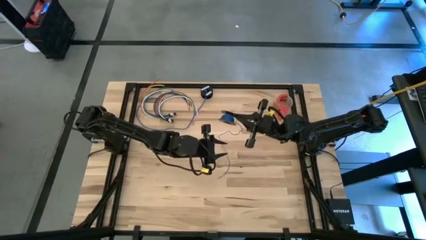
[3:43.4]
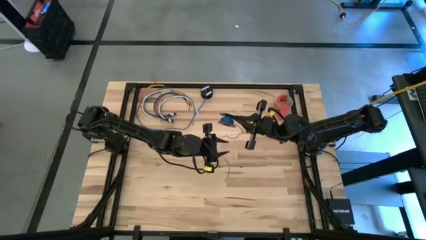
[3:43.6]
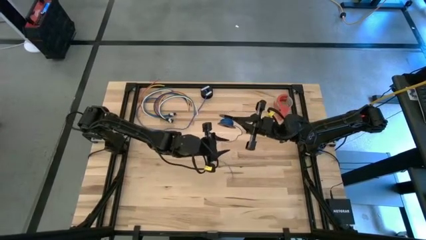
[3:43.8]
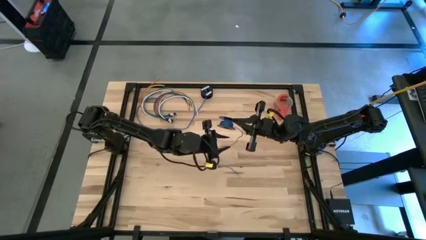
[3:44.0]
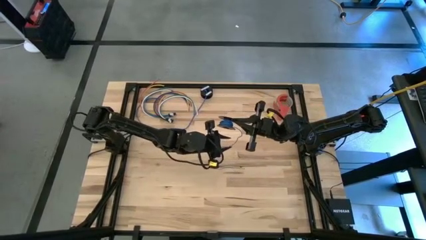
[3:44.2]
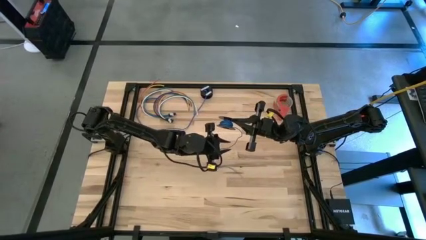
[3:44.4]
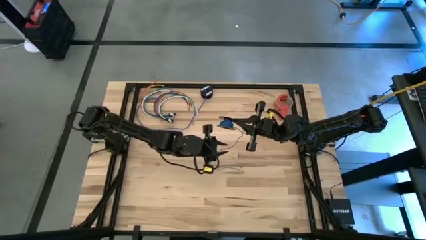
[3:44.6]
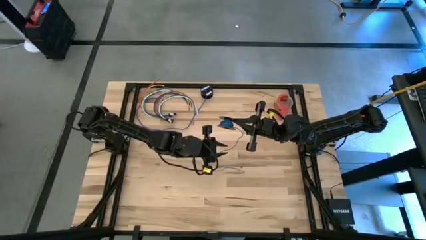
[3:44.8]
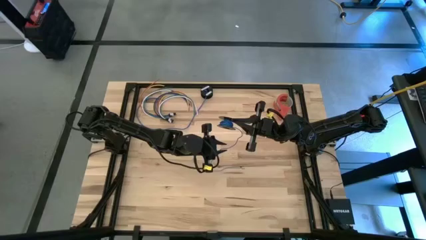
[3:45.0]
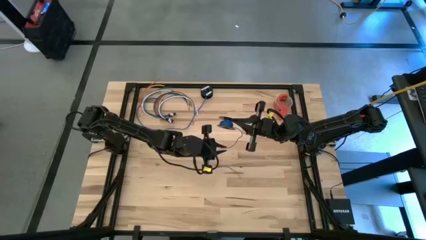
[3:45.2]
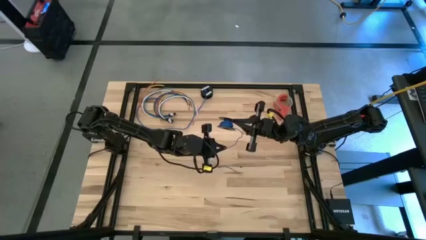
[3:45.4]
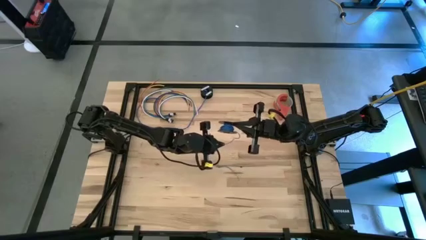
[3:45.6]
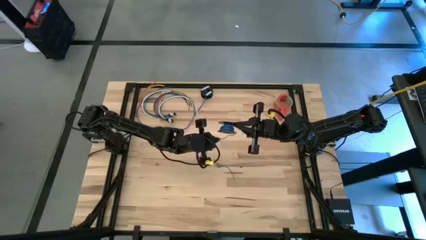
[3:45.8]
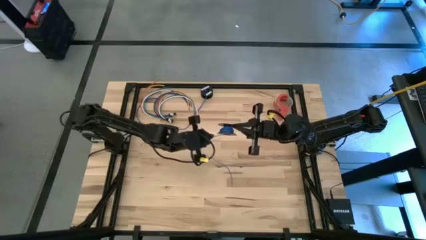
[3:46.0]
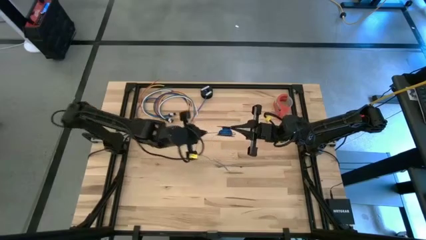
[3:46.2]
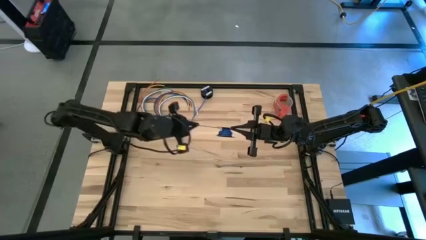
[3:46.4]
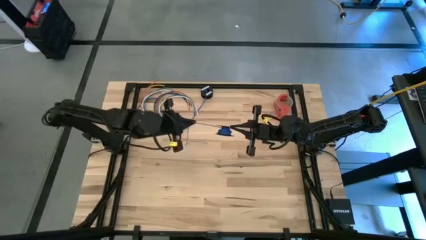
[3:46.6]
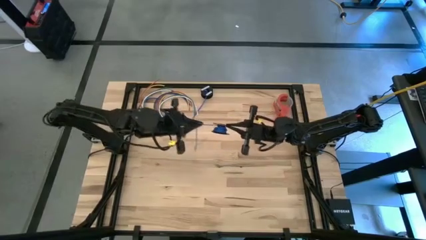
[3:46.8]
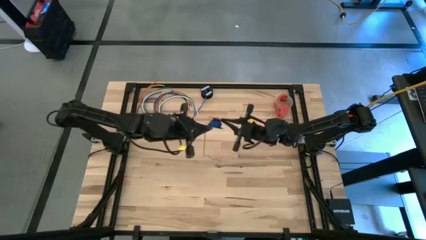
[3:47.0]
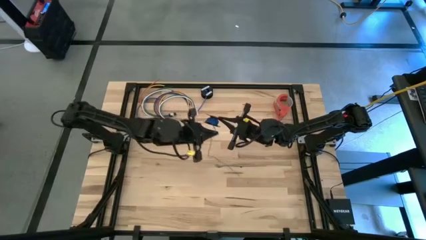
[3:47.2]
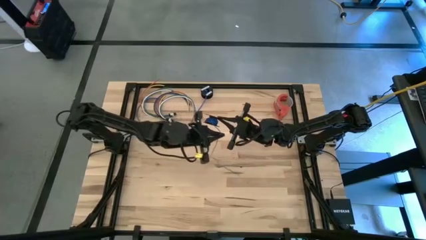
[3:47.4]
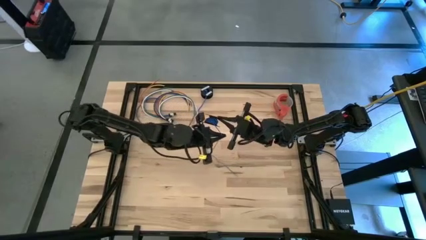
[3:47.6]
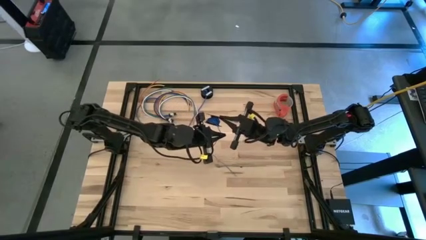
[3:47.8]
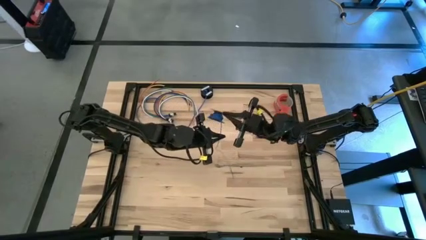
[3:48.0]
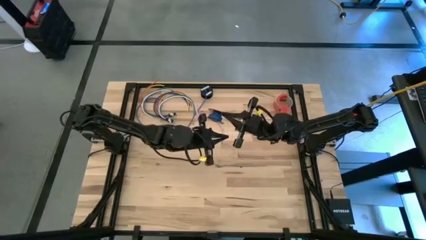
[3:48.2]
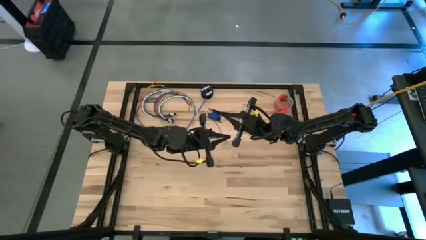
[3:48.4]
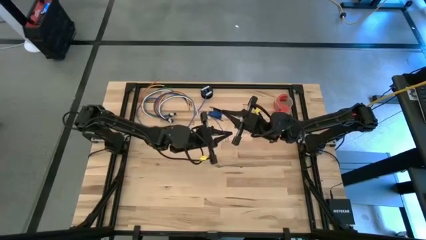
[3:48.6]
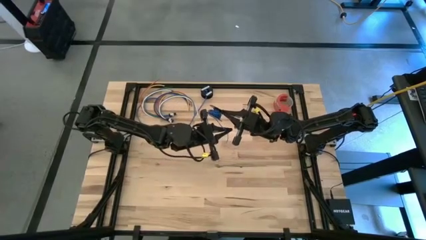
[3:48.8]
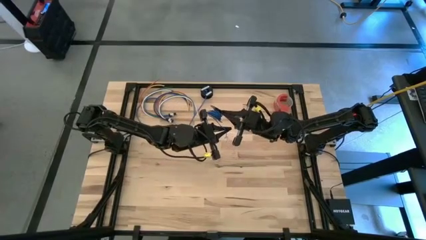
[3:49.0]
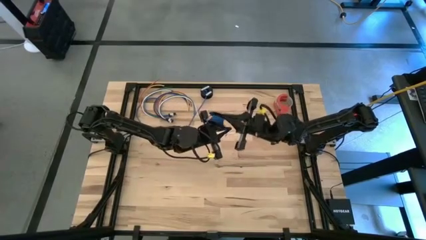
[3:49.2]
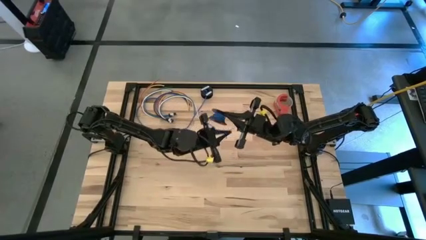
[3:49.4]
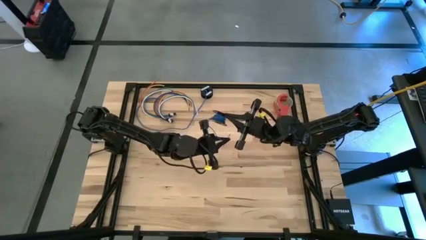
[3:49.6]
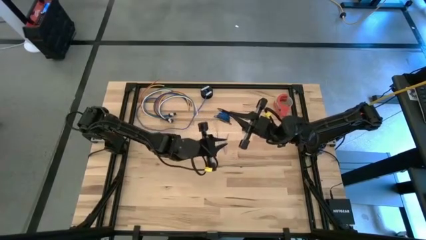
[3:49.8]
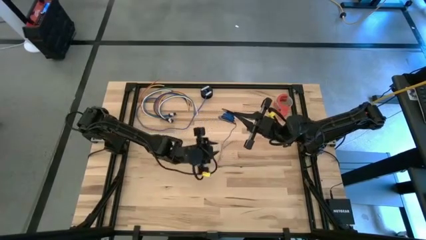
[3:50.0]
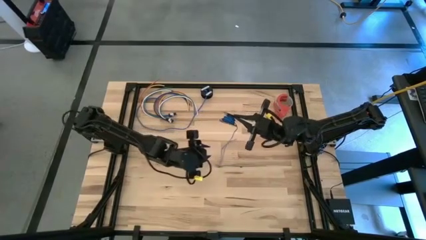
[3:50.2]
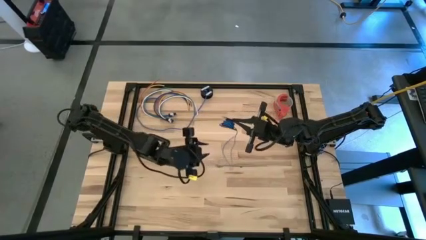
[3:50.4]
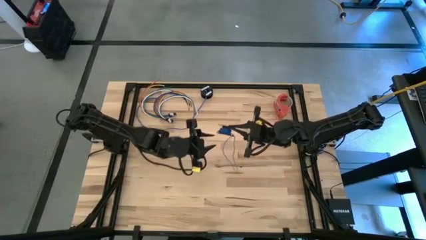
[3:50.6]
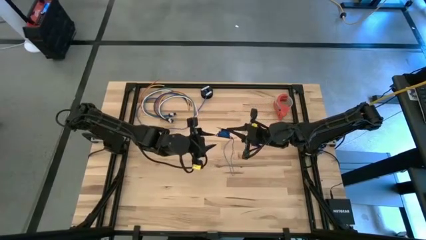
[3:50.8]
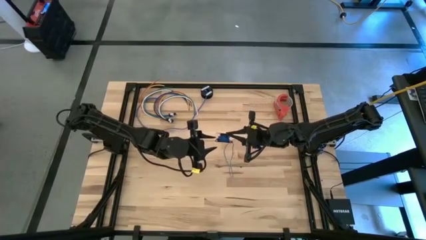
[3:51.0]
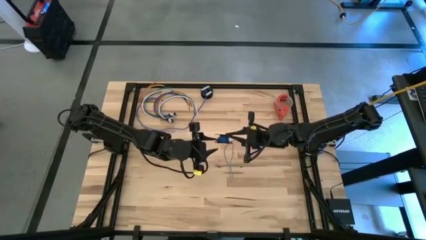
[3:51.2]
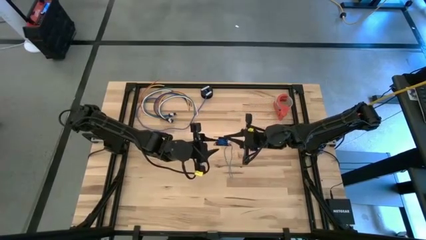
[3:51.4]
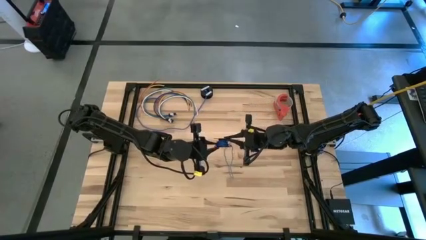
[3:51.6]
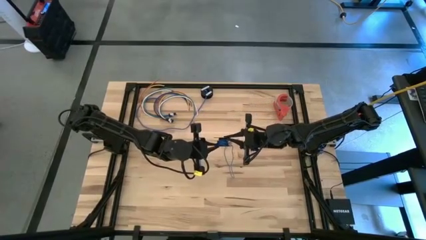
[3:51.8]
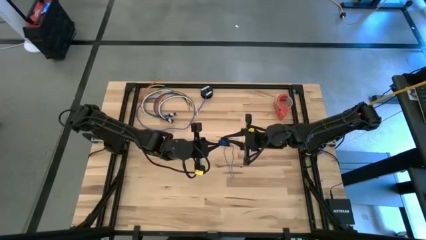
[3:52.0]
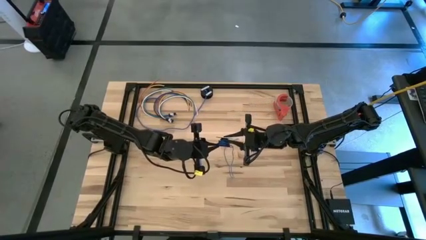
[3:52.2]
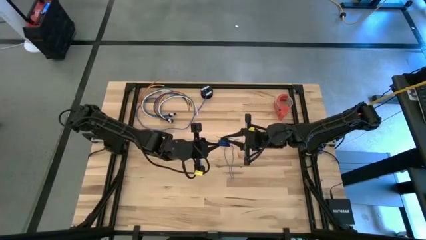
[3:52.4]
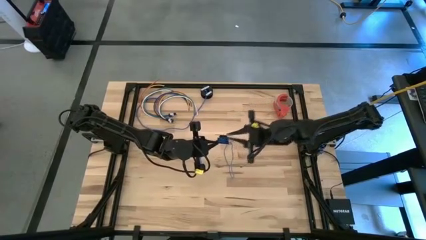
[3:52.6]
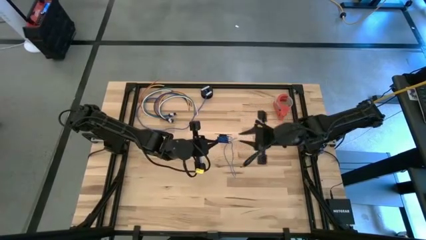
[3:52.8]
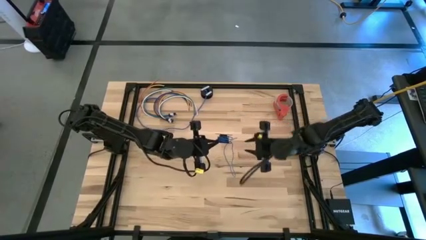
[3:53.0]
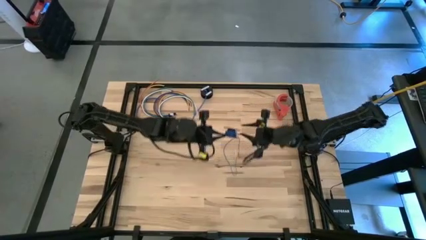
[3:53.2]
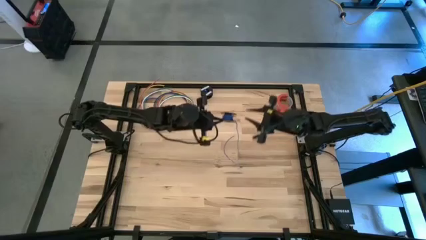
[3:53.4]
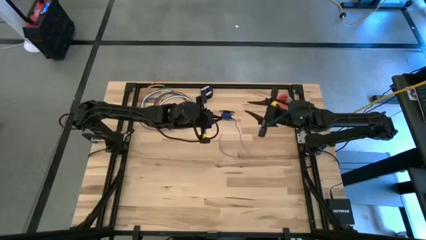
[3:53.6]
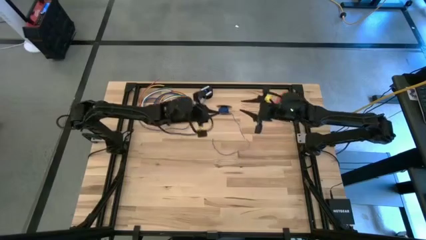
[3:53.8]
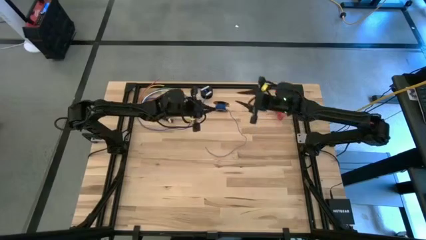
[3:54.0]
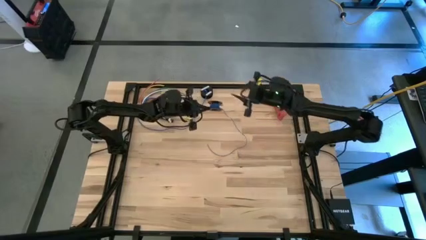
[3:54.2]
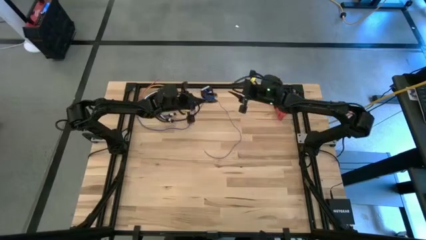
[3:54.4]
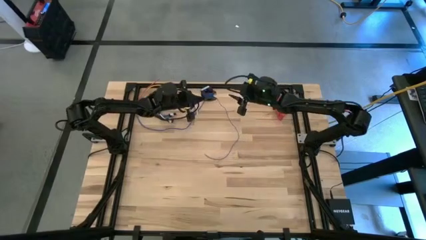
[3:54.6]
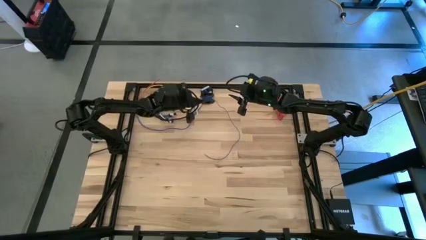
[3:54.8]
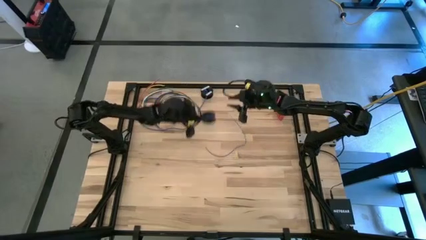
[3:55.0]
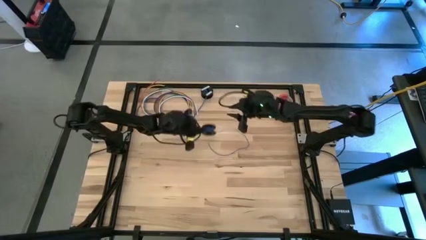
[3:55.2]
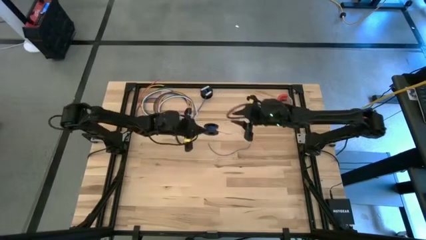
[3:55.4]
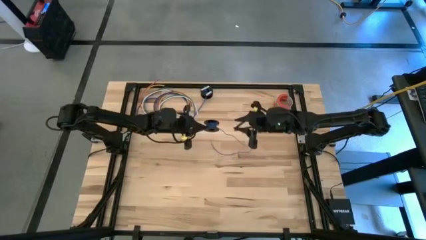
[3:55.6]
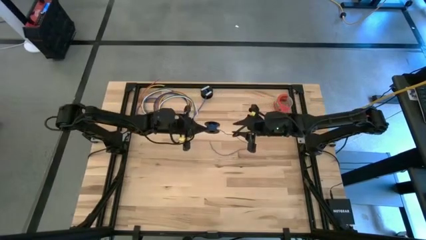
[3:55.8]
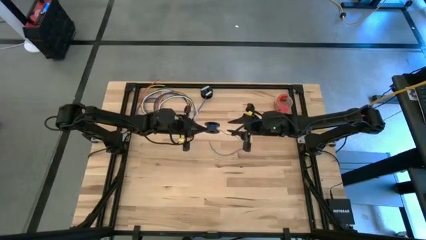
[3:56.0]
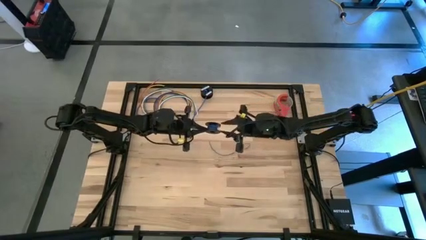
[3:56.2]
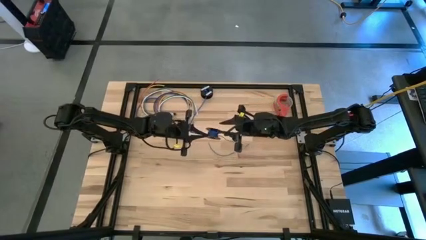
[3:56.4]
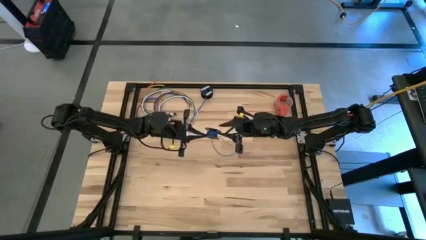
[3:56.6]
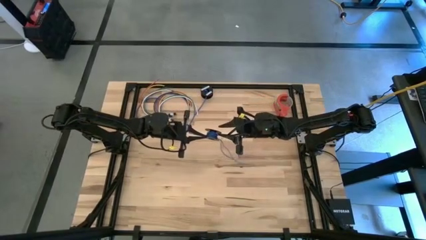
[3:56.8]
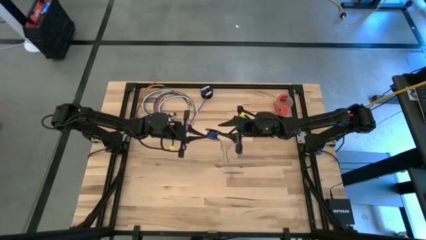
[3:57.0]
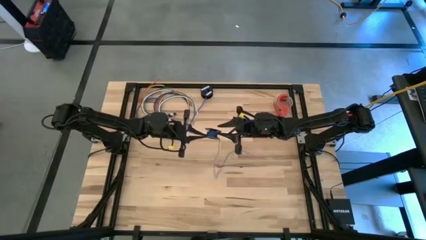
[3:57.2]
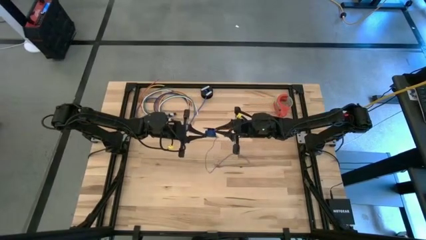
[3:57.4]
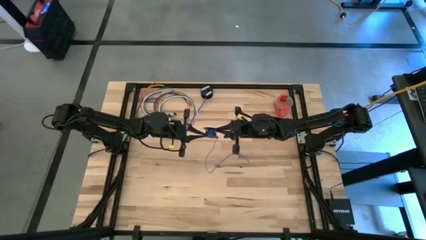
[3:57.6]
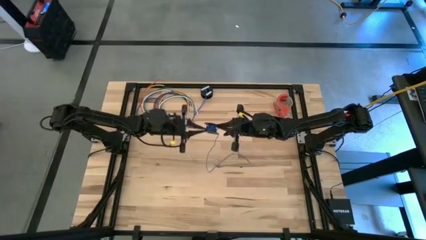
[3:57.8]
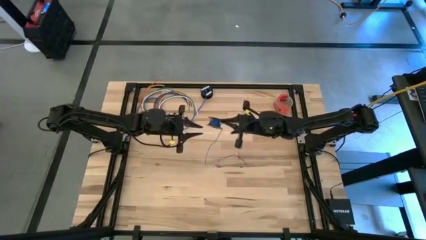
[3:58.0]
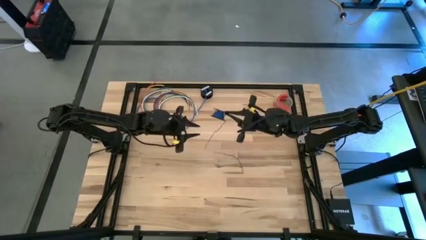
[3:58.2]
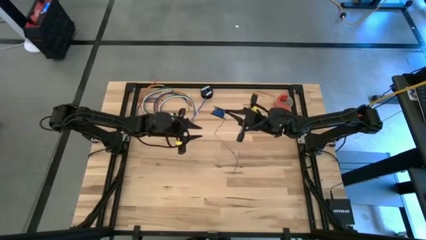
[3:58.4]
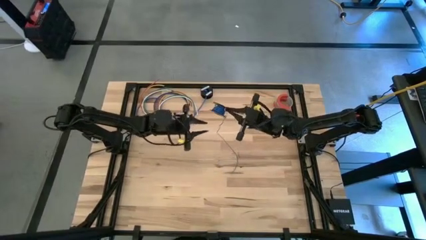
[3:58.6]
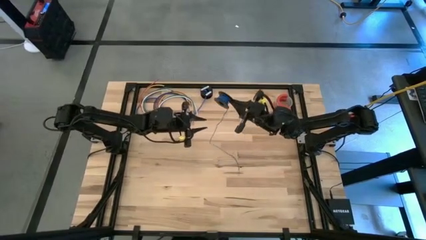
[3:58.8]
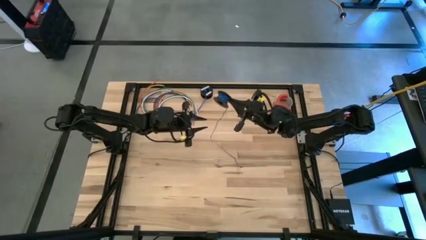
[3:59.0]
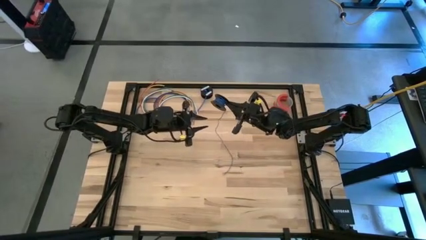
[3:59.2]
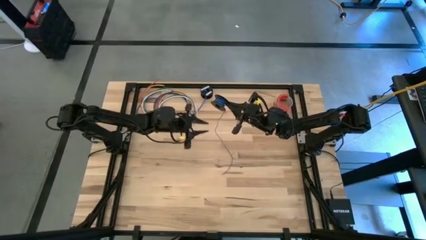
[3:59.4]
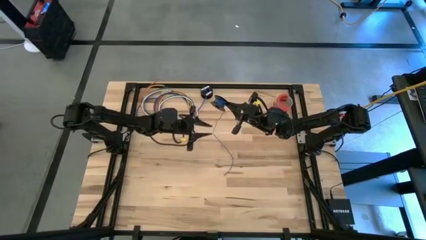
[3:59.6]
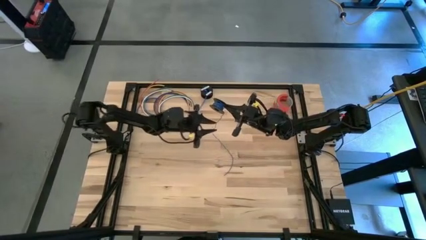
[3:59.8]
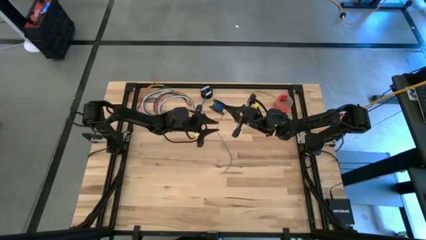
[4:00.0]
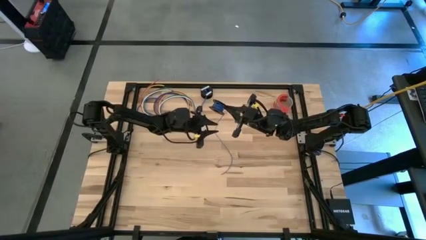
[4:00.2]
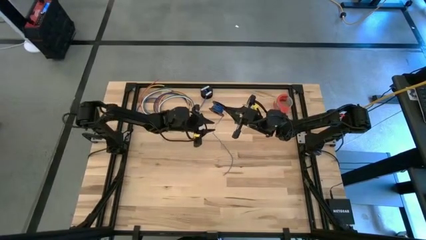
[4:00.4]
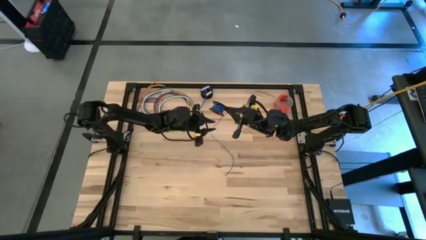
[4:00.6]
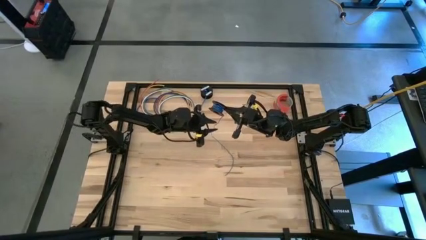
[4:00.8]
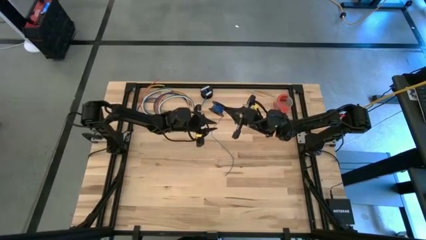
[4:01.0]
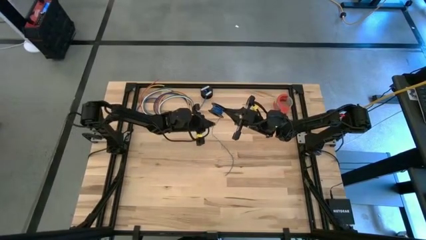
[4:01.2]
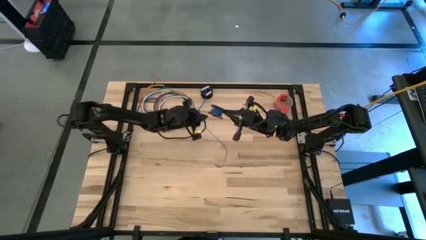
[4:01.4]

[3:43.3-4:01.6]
Task: Coil cords
Coil the blue wire onto the black spool
